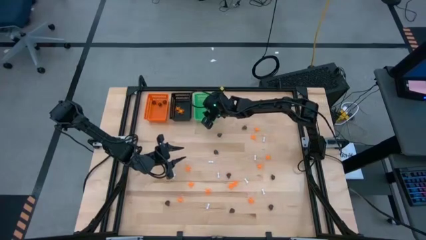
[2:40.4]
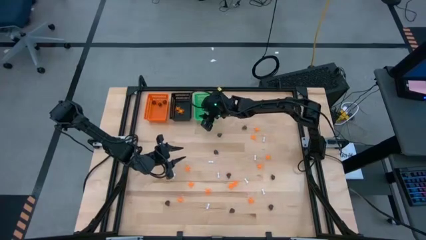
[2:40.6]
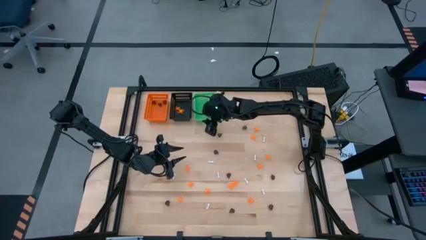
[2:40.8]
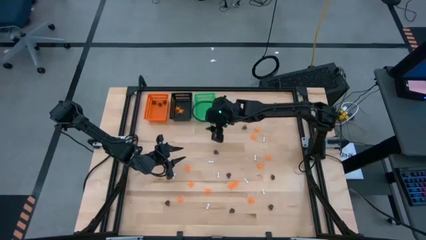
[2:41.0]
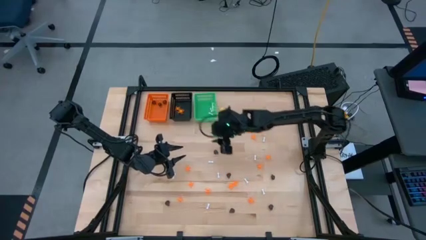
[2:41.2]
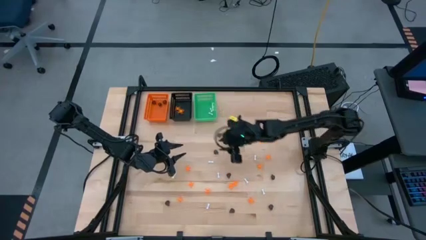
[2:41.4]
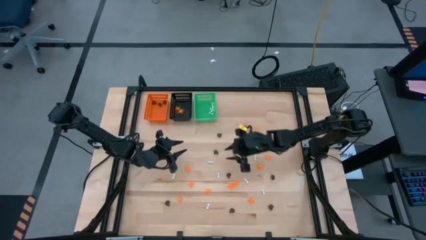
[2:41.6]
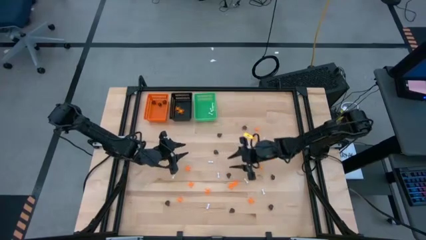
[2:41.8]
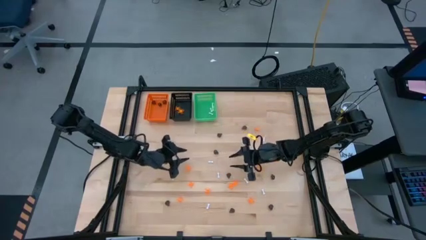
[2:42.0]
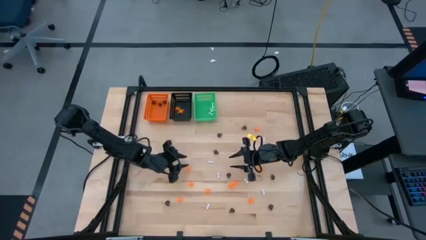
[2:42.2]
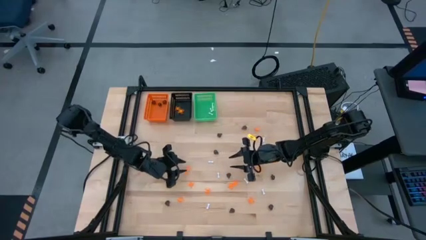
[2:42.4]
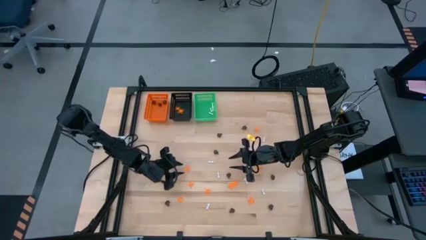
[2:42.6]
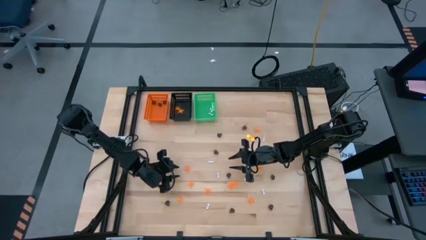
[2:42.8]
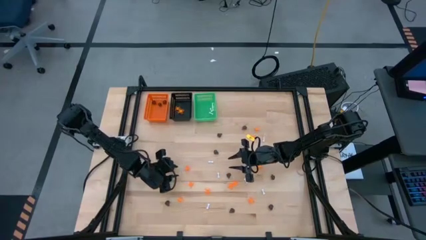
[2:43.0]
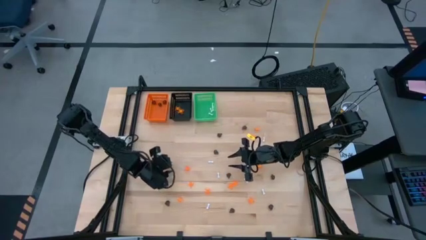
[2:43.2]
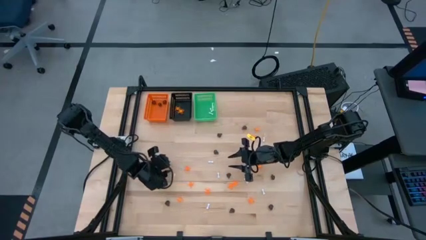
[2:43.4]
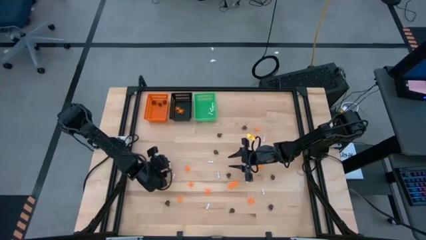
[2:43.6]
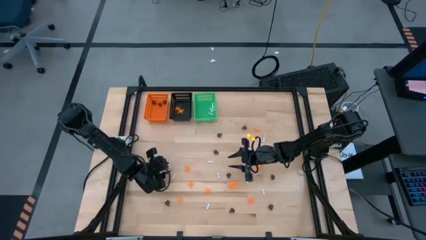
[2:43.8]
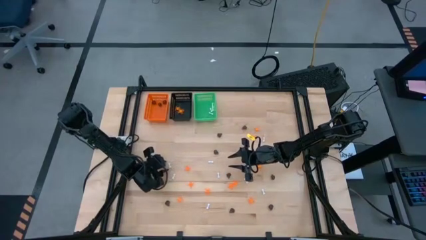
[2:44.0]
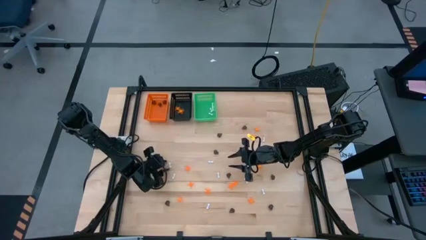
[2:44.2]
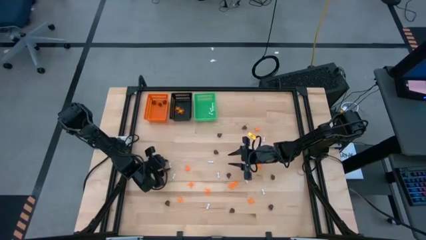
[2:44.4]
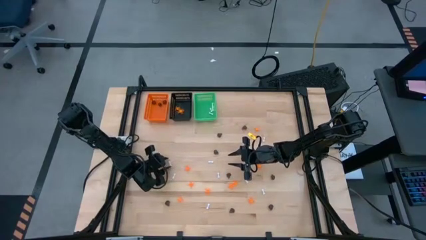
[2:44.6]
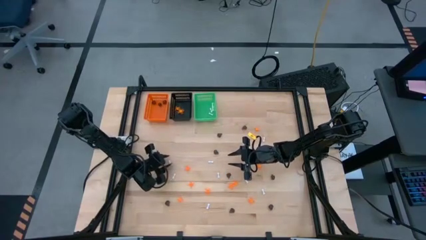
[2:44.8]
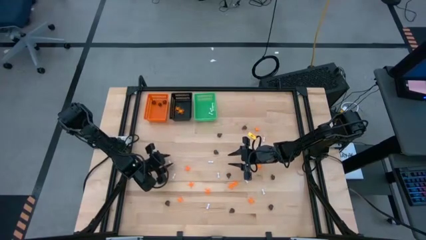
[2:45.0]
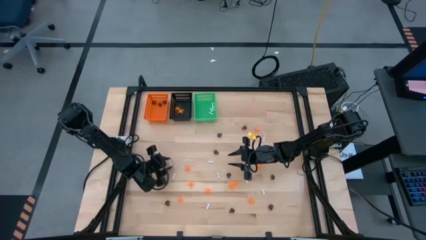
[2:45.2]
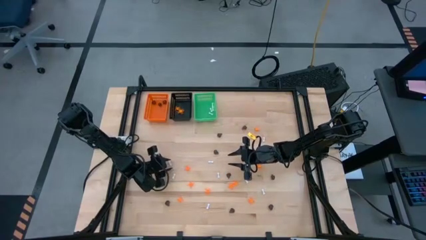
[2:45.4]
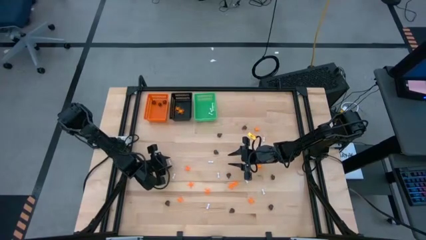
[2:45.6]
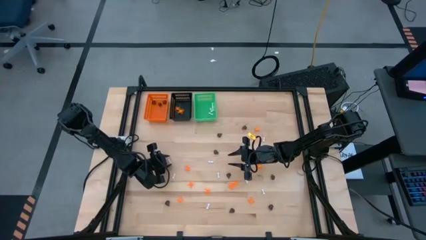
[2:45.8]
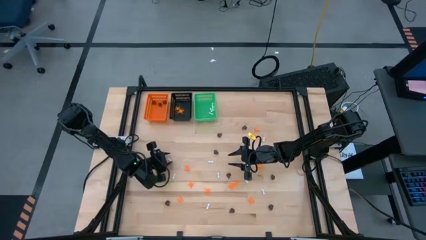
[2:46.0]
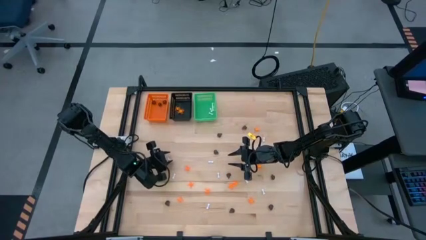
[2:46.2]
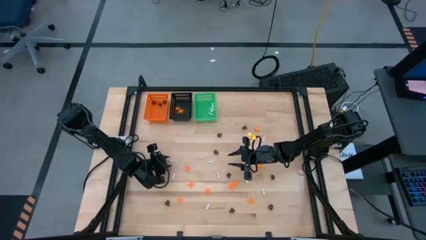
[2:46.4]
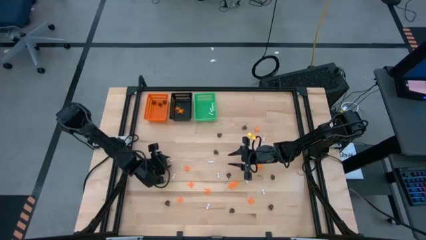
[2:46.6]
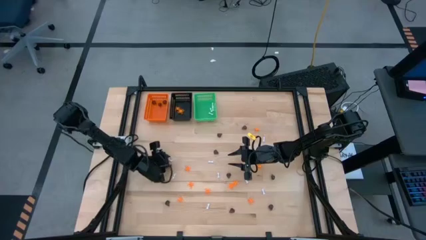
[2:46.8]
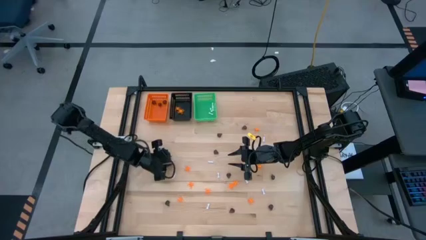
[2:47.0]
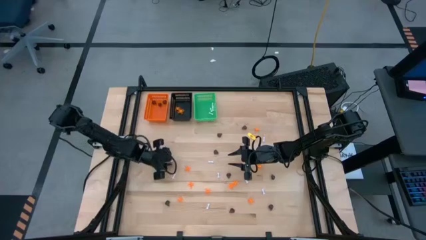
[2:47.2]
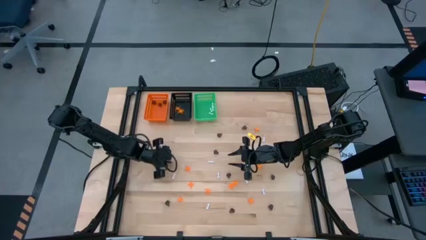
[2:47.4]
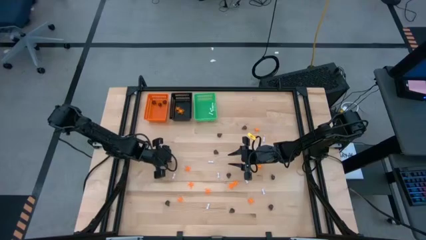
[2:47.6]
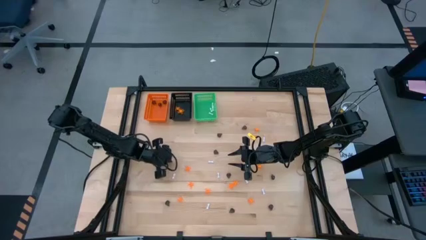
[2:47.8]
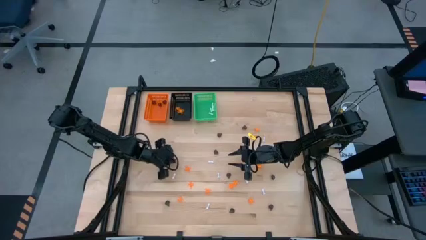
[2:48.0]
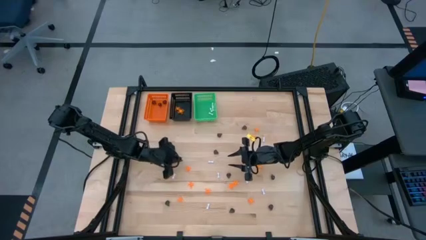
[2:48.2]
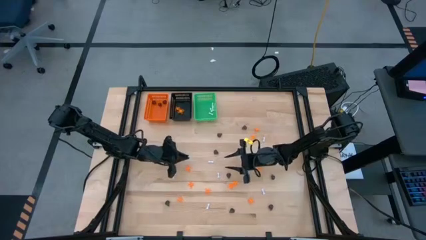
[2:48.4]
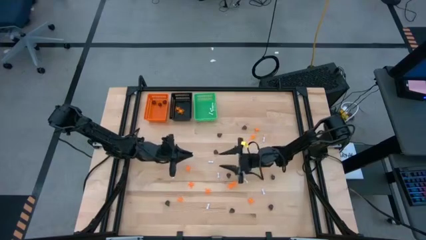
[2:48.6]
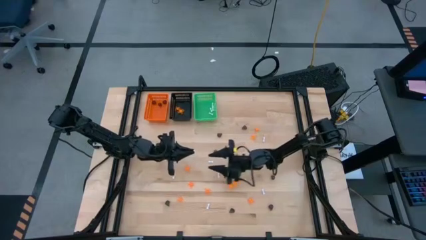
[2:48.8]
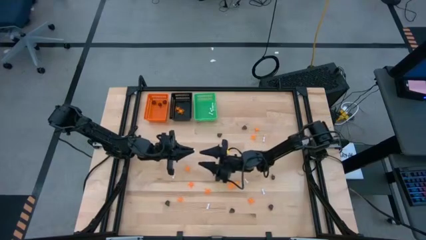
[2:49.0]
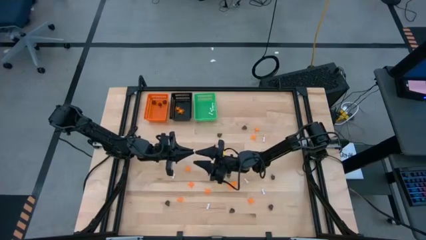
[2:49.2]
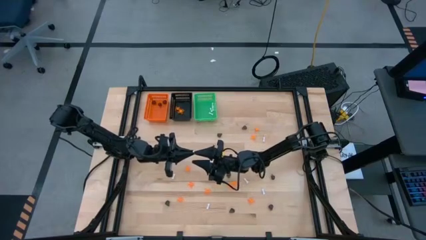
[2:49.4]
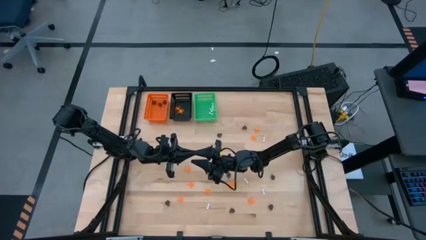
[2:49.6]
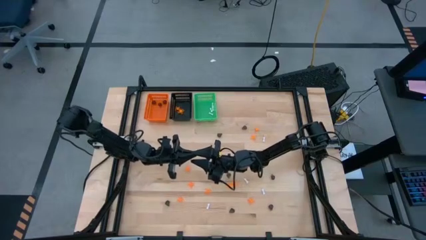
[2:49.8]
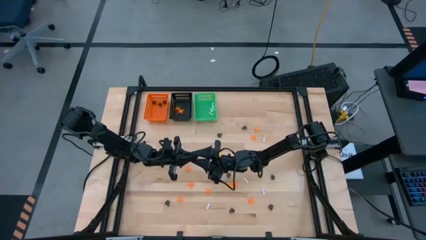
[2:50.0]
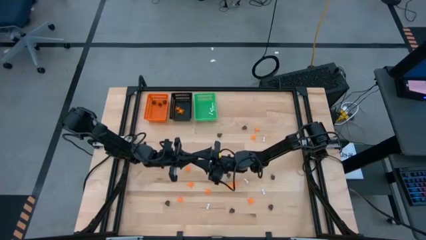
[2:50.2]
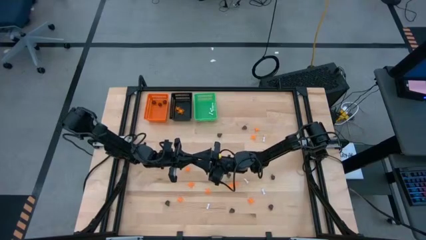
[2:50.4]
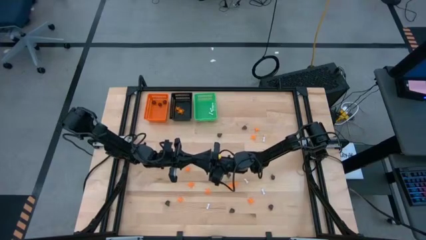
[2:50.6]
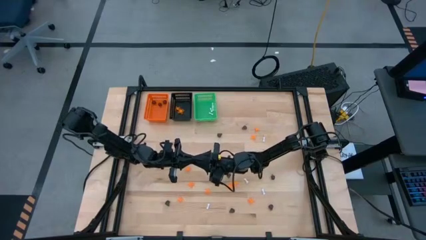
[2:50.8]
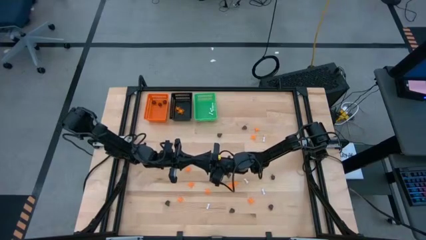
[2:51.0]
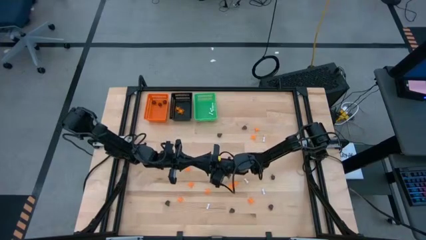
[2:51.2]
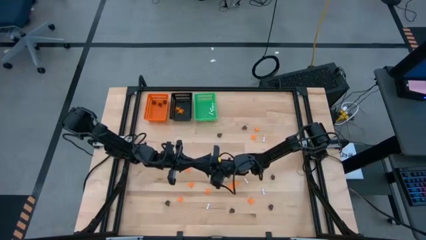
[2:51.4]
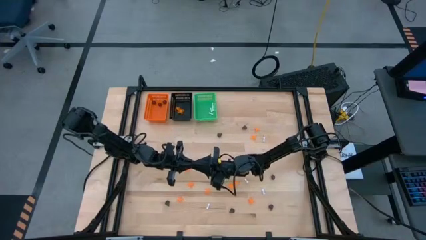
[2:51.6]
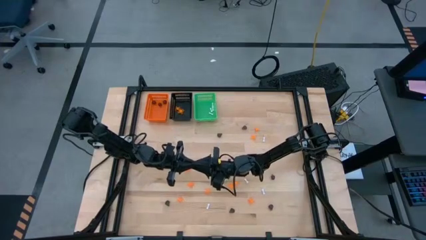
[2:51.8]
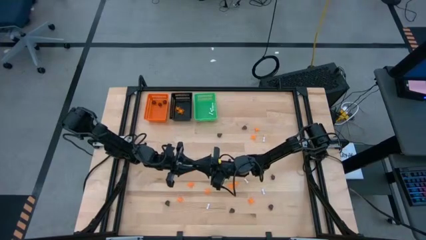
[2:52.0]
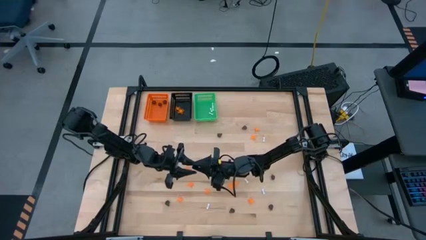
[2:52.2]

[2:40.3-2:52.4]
Task: Sort Halloween decoration
Put the white bone toy into the green bin

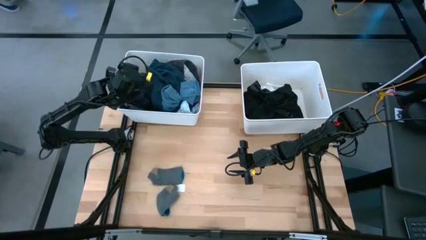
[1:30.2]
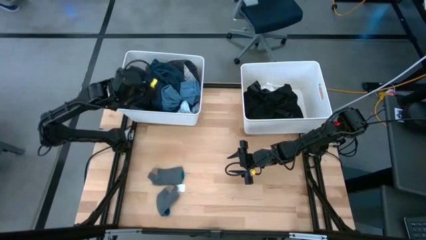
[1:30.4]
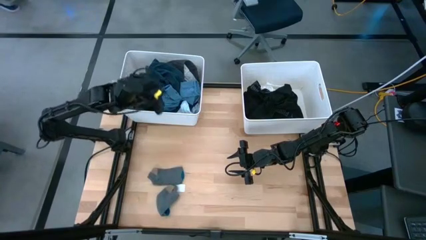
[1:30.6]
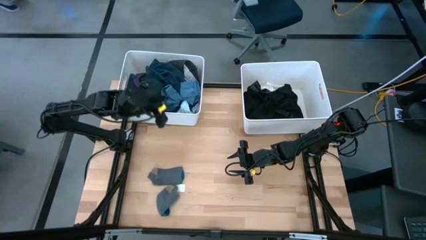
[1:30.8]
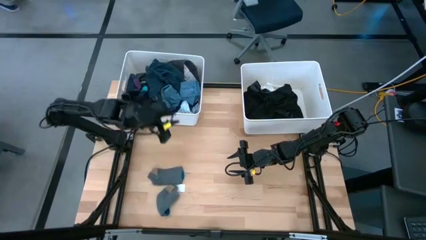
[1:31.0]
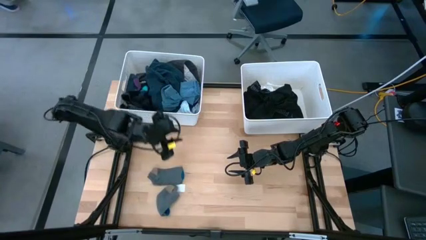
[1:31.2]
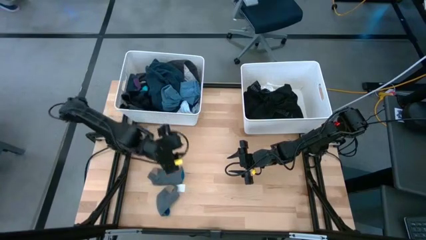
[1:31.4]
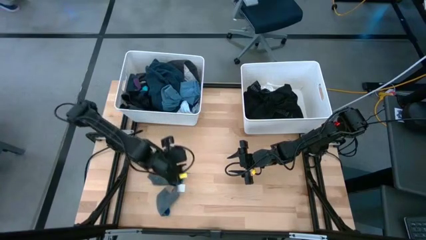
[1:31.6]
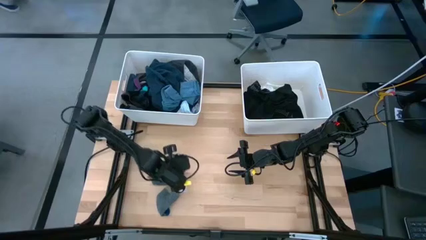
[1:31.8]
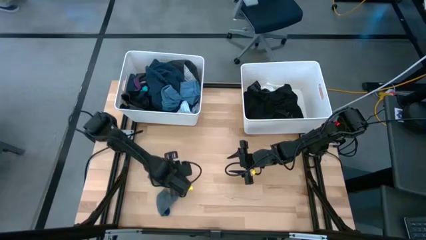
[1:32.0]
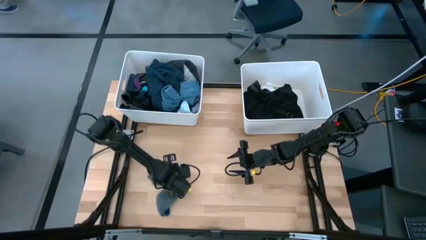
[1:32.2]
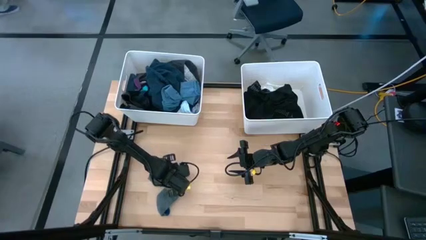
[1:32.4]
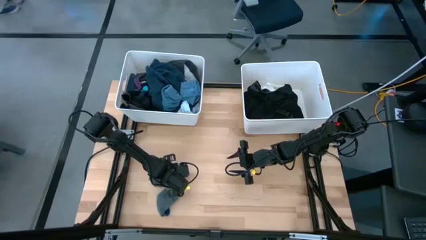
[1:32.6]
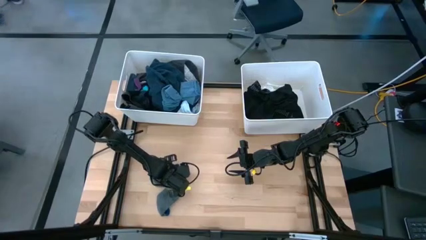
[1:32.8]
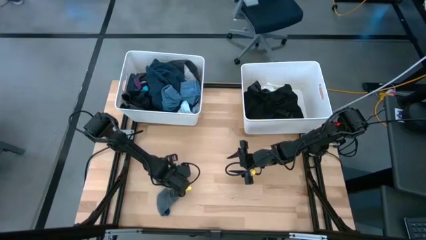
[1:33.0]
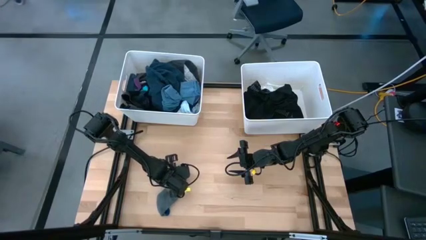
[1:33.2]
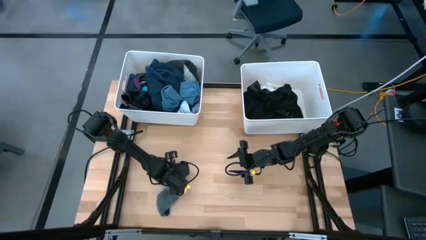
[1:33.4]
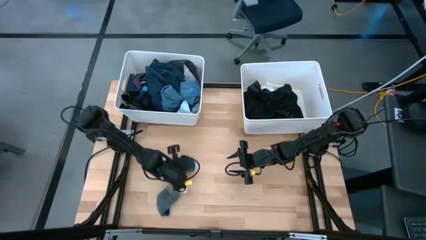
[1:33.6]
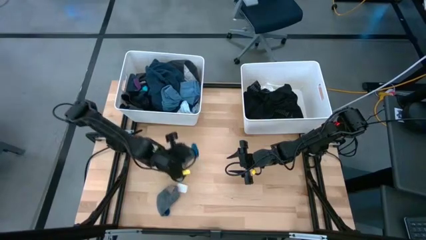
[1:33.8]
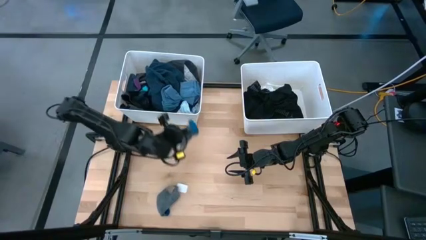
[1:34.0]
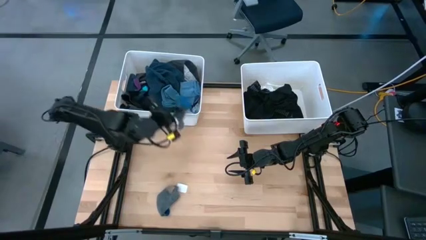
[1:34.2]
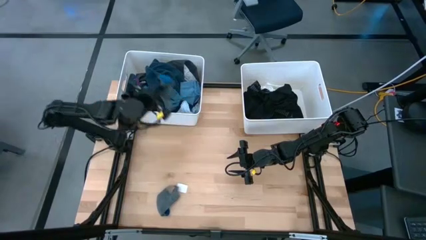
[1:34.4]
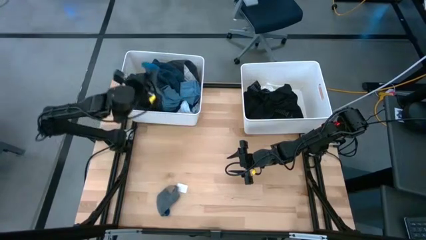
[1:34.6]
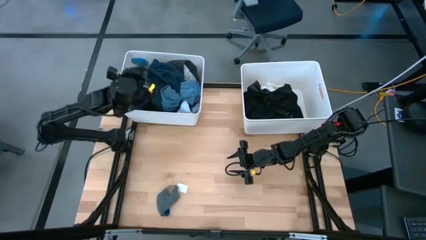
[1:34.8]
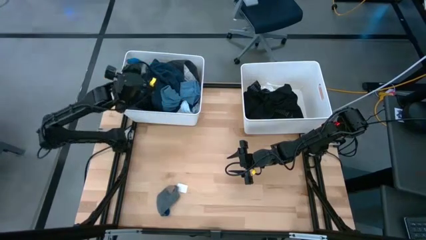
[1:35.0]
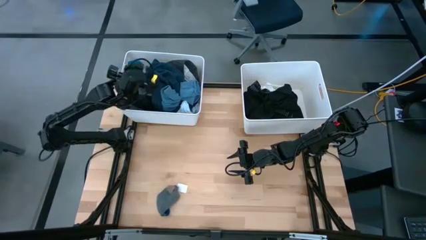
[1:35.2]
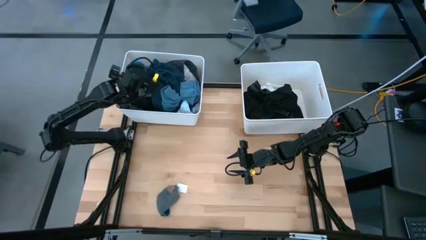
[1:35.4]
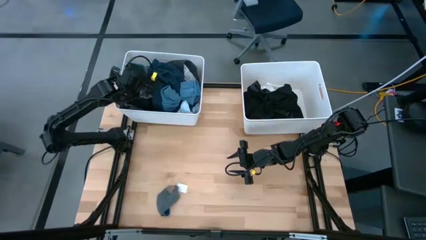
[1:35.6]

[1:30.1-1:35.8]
Task: Sort clothes
Put the top gray sock into the left white laundry bin
